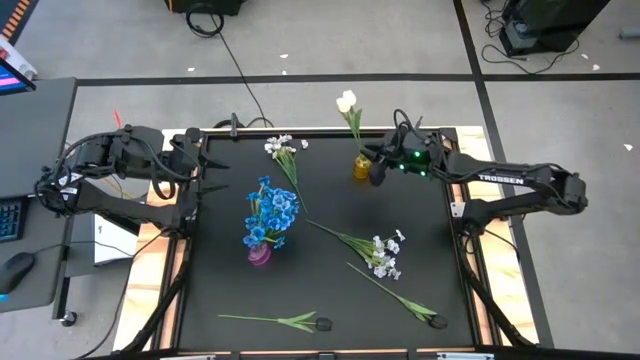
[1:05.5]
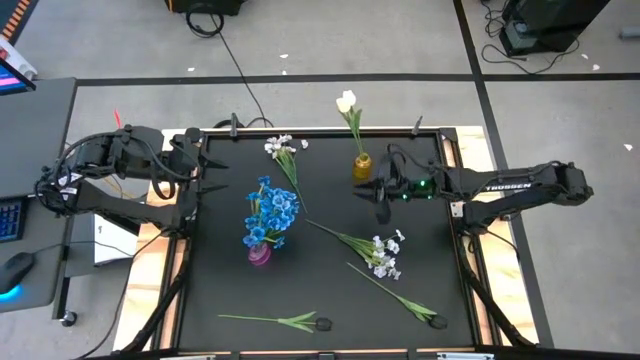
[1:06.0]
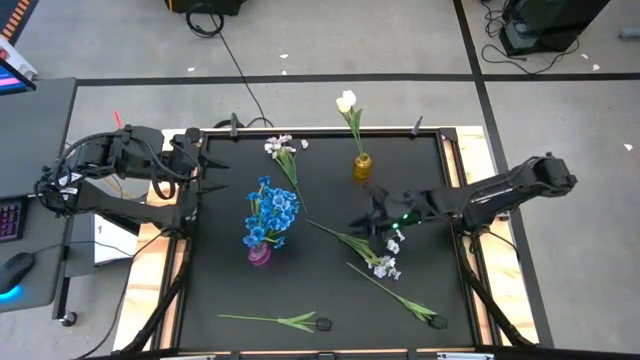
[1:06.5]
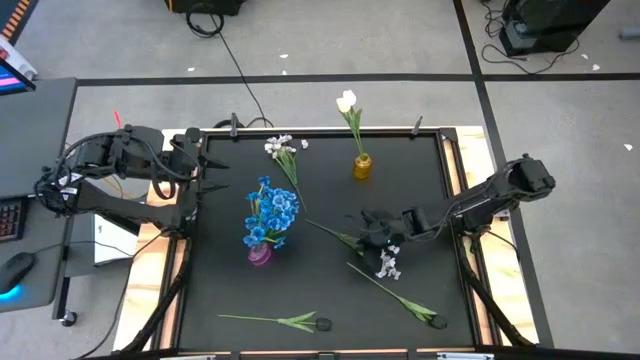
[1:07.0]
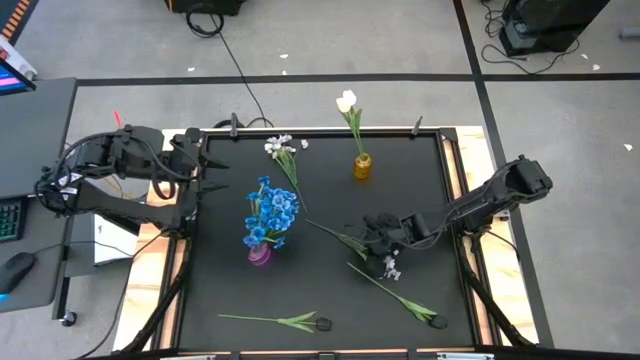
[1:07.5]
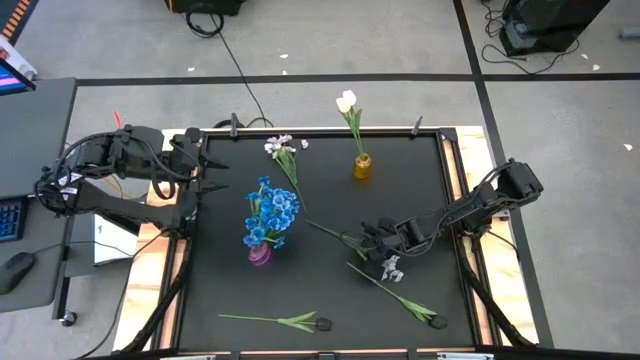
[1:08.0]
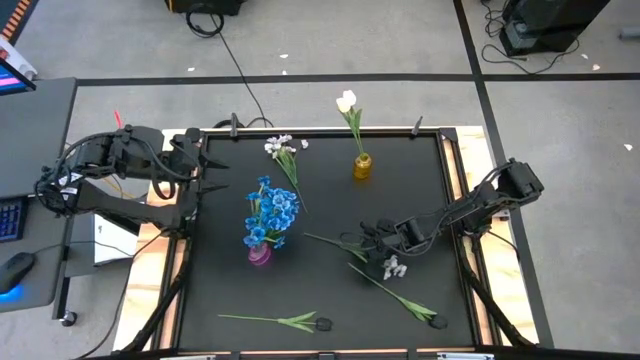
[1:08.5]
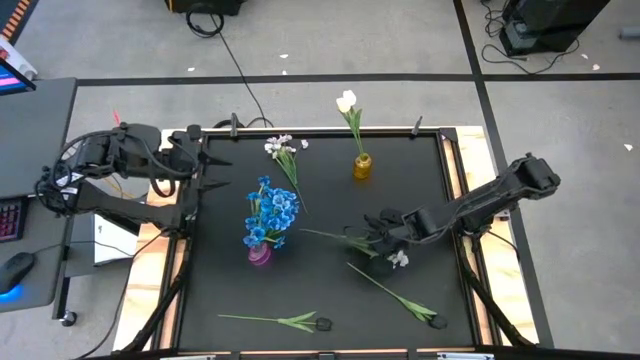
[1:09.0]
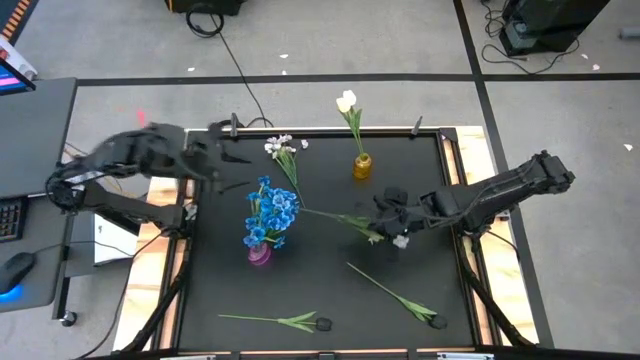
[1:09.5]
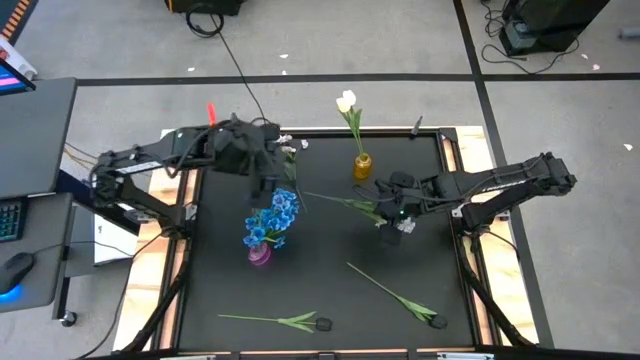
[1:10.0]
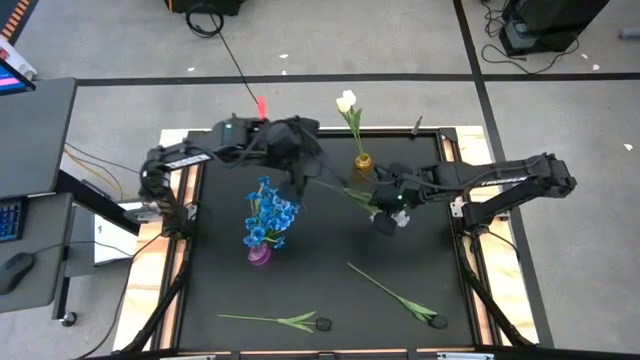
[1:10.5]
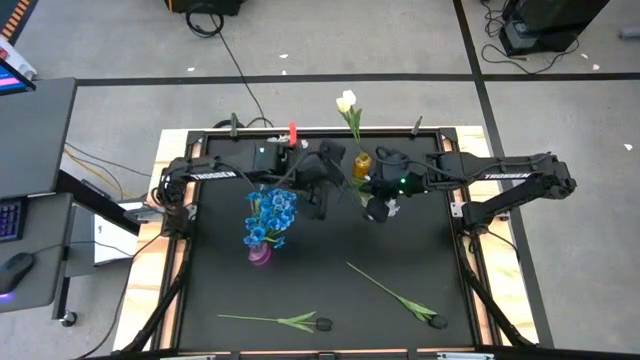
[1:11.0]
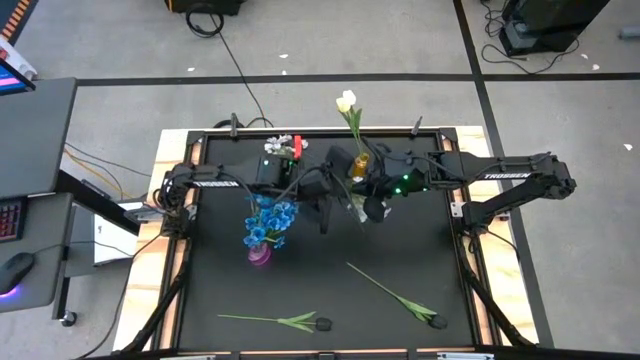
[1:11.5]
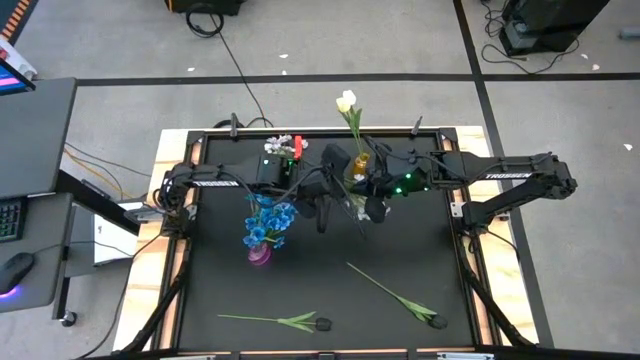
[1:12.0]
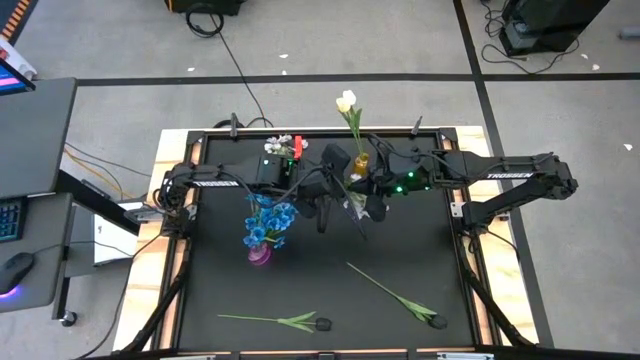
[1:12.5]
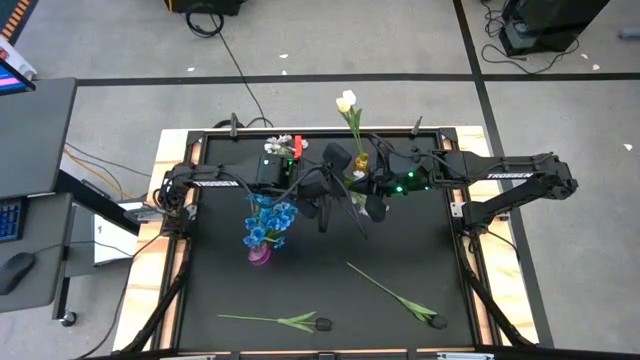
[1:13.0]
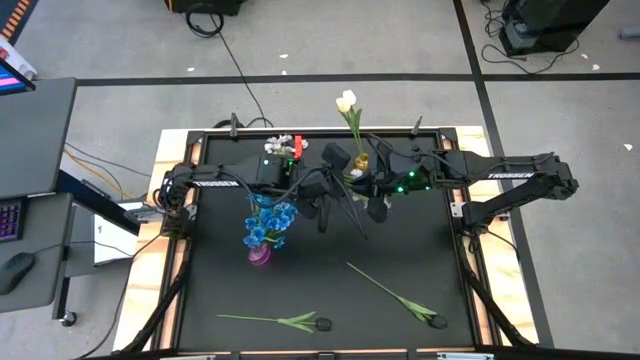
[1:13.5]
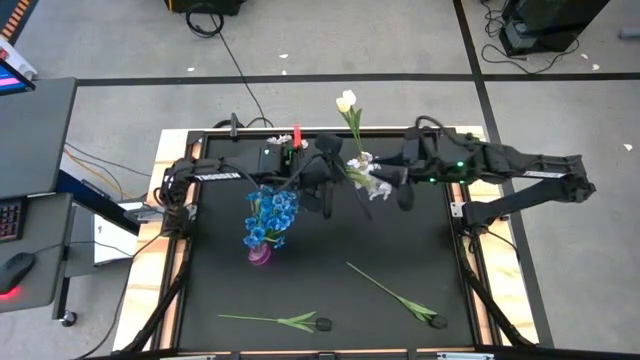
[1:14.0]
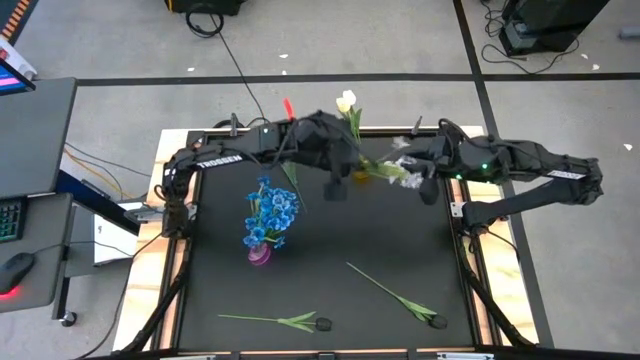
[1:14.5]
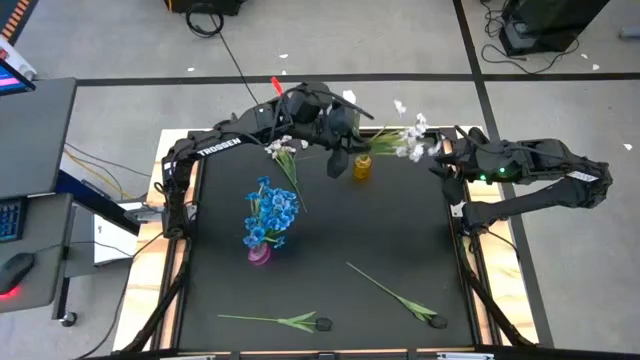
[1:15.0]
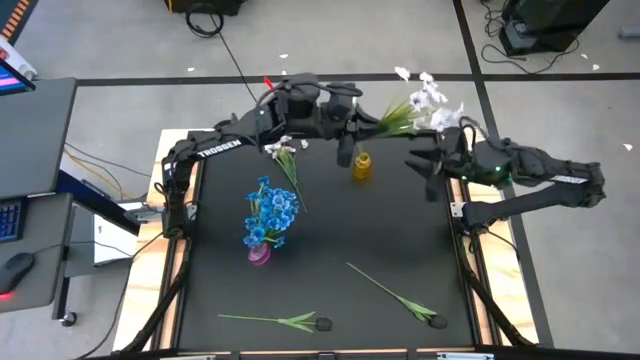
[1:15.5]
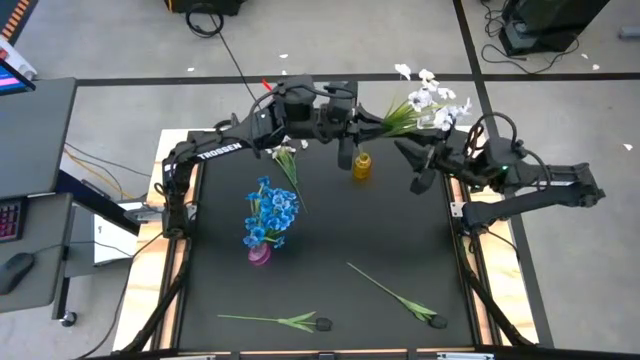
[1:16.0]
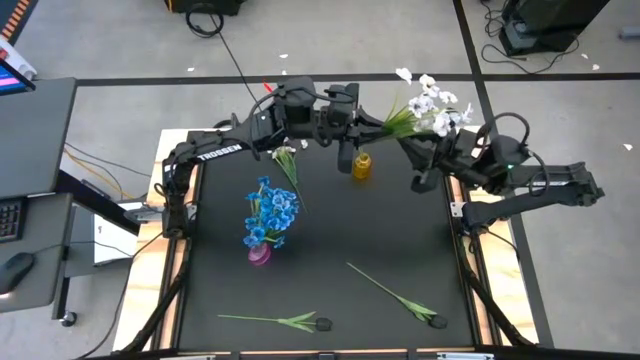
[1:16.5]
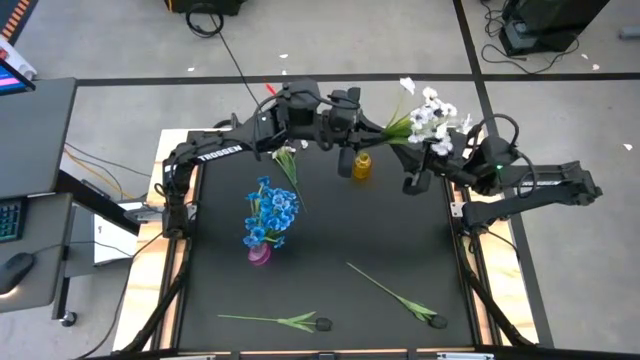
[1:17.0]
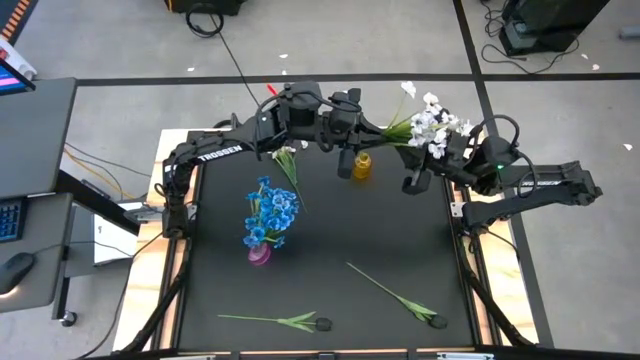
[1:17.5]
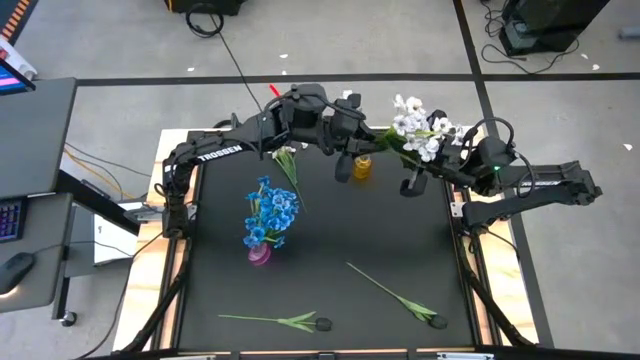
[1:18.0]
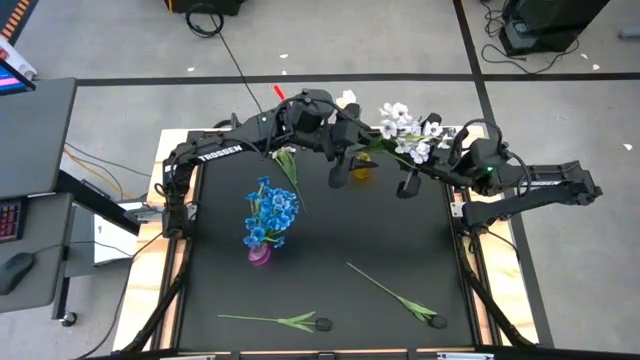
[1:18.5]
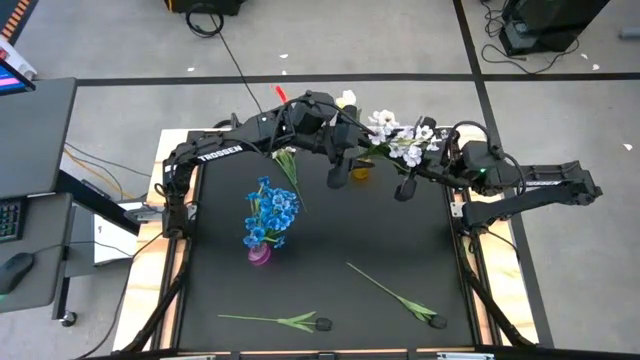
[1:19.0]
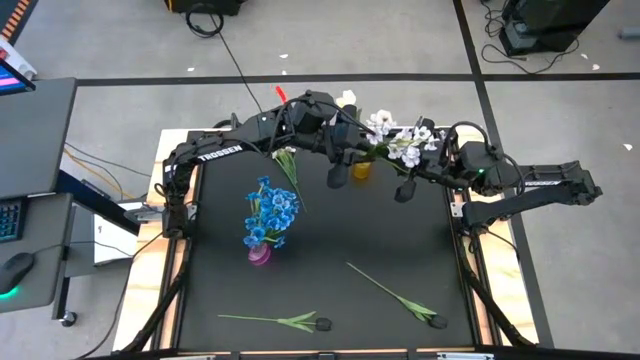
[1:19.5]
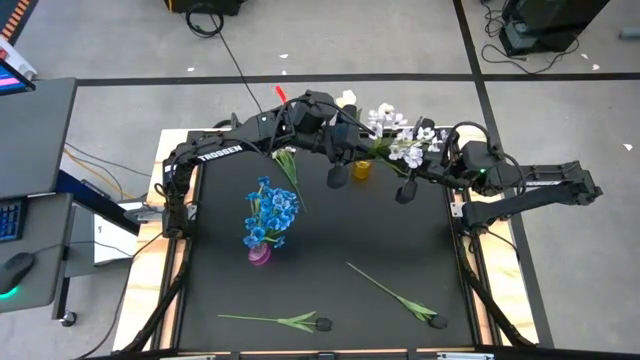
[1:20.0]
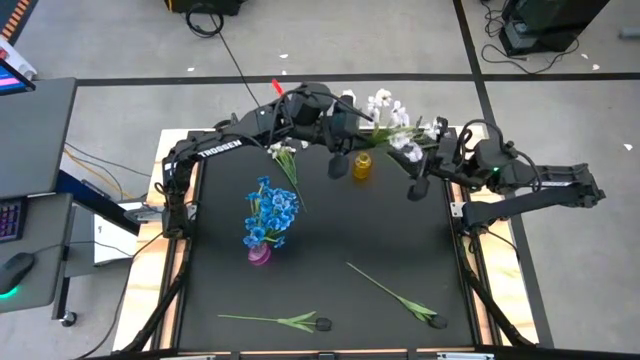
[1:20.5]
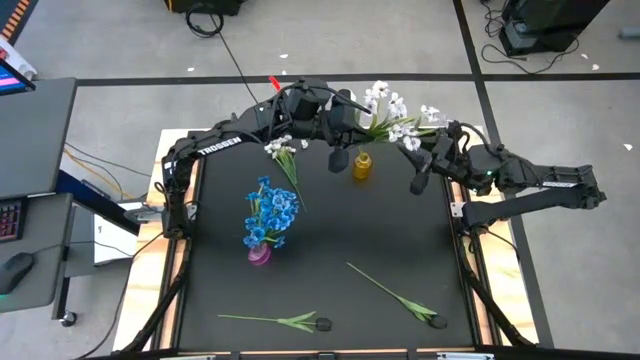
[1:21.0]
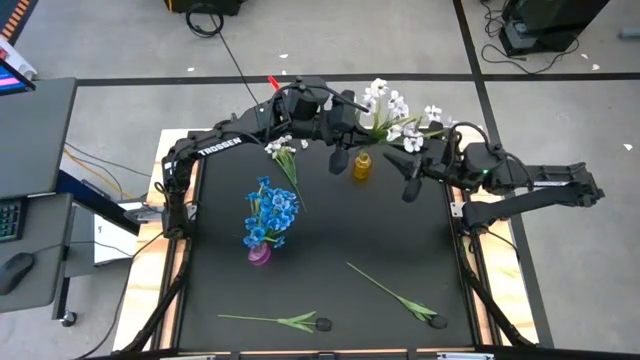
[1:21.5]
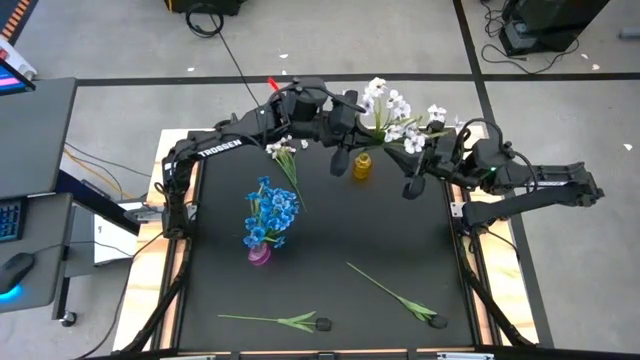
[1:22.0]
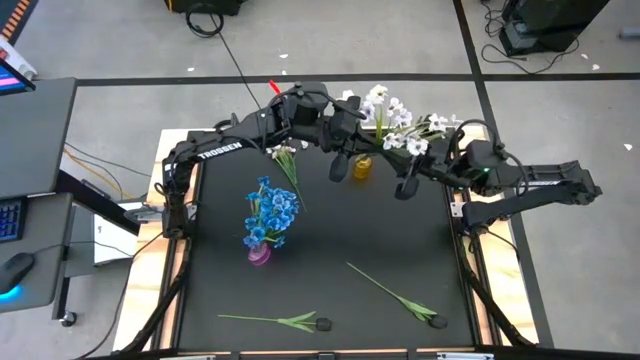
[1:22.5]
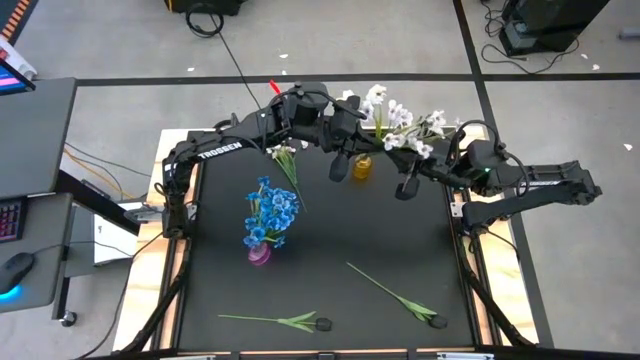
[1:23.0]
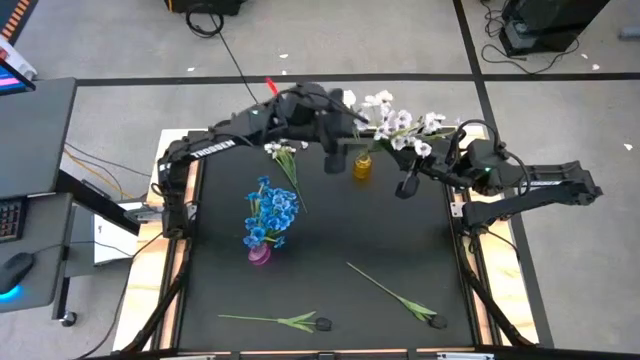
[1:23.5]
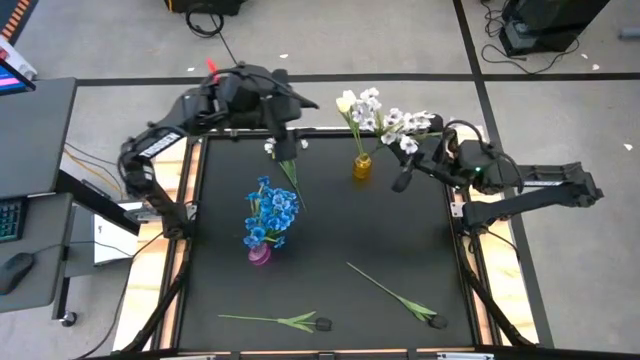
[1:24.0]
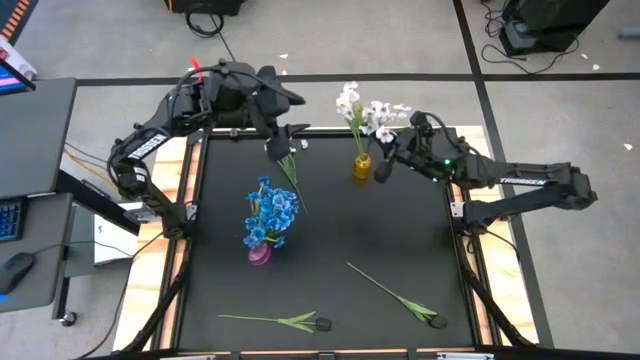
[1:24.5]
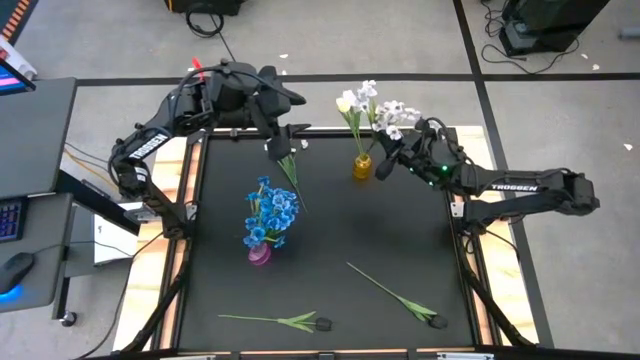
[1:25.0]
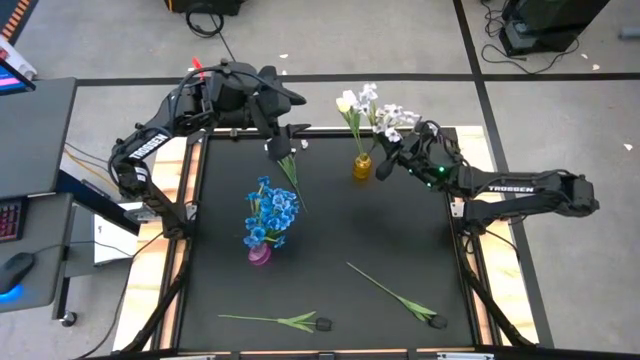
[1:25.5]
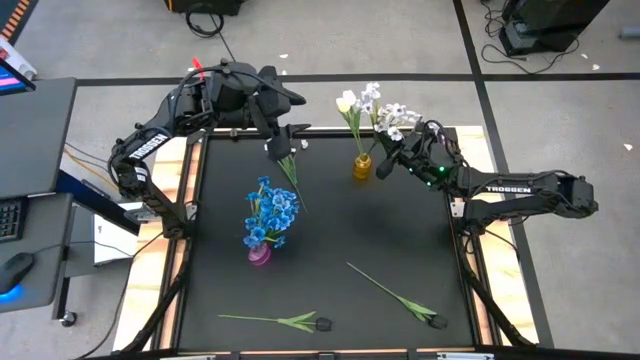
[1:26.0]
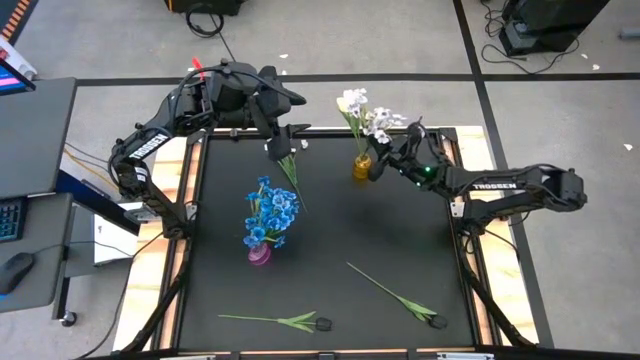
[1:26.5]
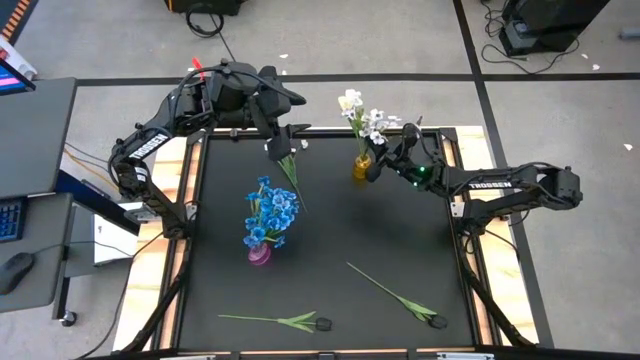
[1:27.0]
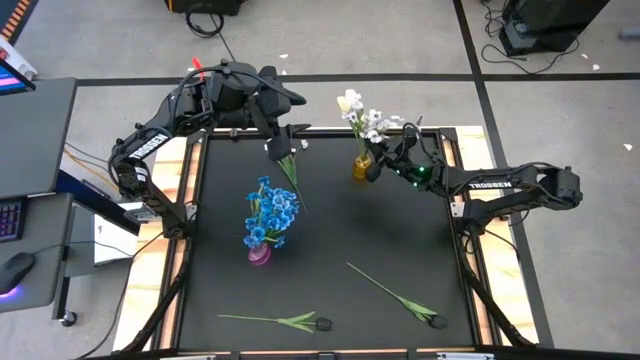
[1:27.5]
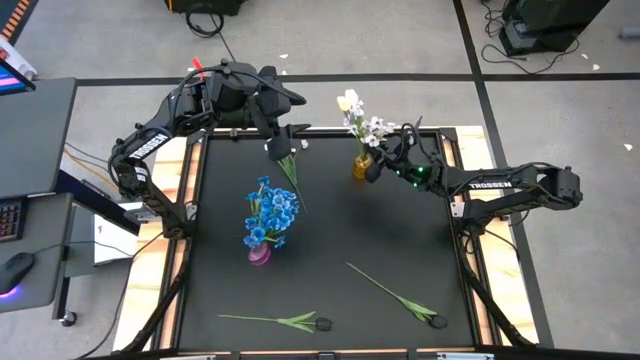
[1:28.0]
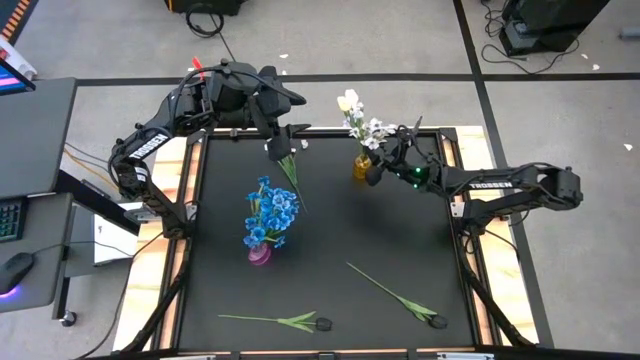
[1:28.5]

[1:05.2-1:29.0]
Task: Sort flowers into vase by color
Put the bottom white flowers into the yellow vase
